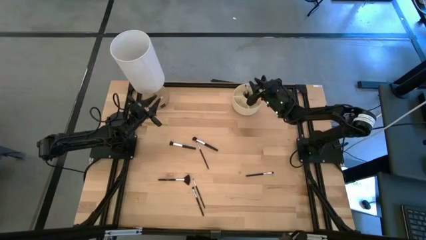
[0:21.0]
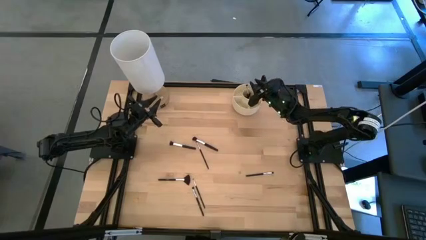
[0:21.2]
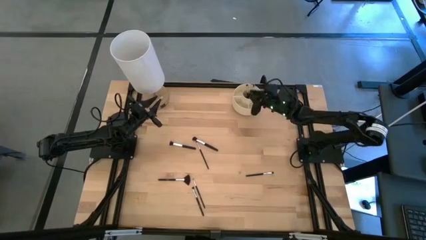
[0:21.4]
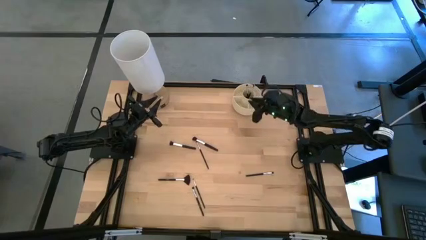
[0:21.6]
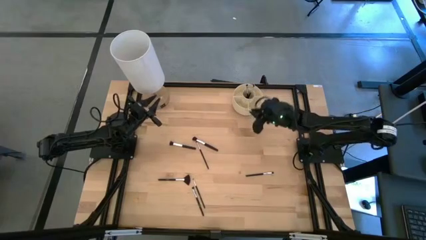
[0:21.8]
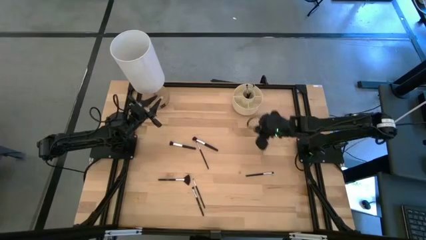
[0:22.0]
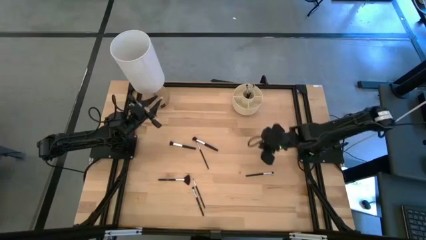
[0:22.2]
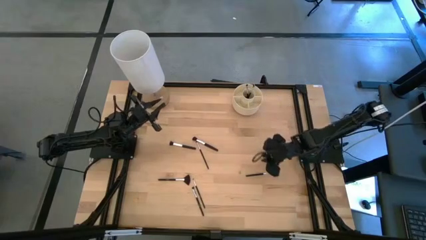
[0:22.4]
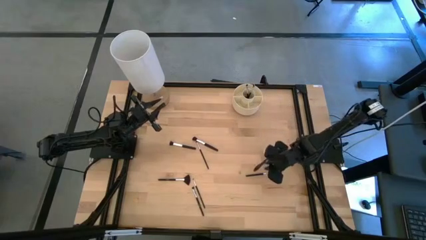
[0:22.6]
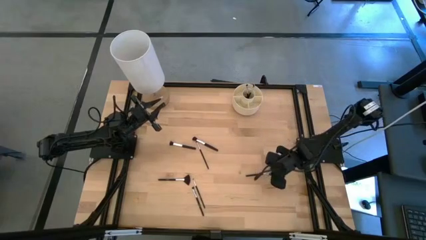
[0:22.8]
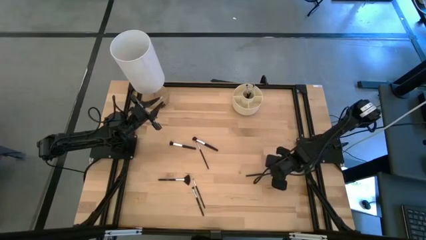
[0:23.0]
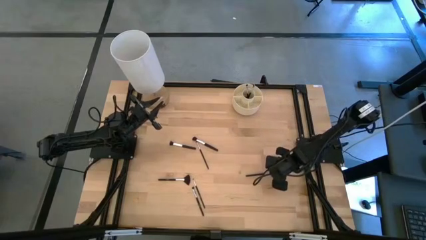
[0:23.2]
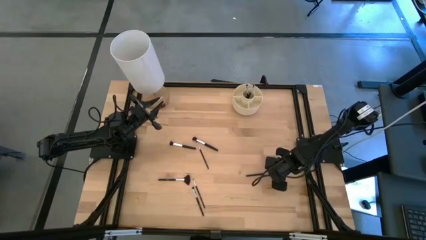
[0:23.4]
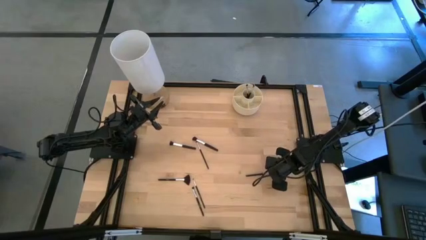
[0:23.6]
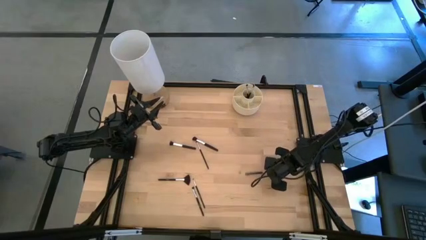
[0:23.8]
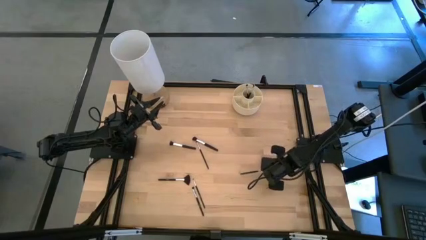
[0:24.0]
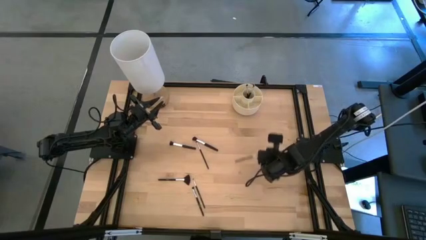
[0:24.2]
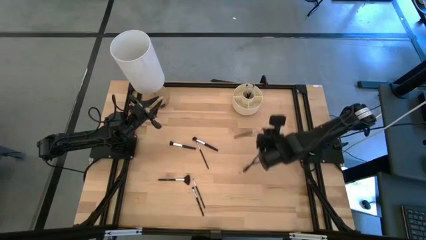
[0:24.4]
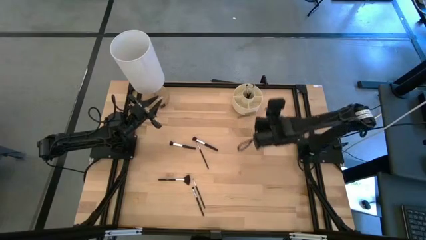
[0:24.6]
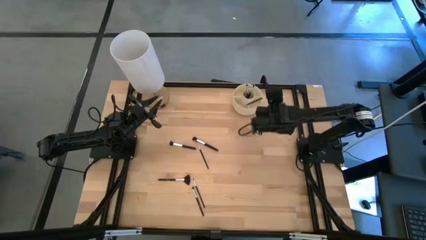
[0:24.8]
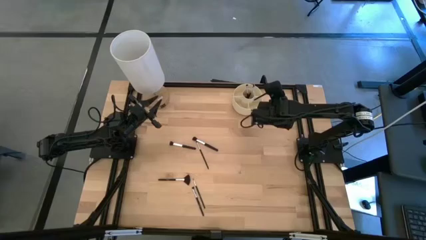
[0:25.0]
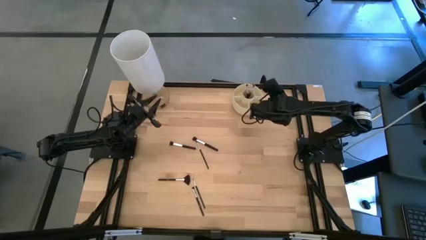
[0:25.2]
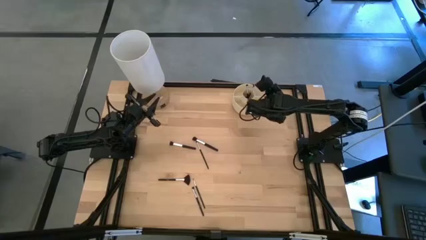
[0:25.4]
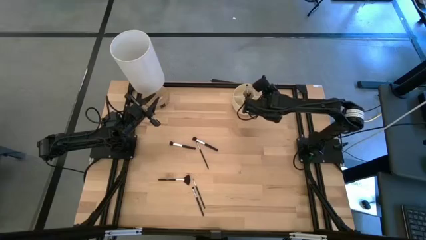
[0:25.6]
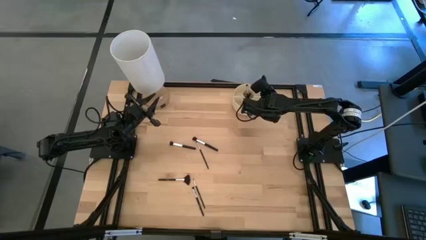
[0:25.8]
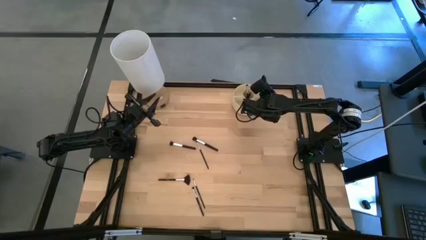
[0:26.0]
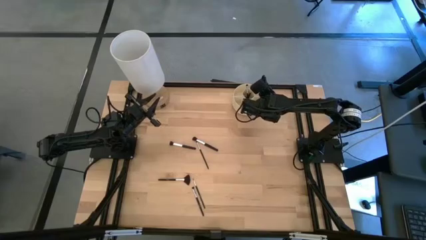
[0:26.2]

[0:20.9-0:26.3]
Task: Sort items
Put the foundation brush into the pen organizer

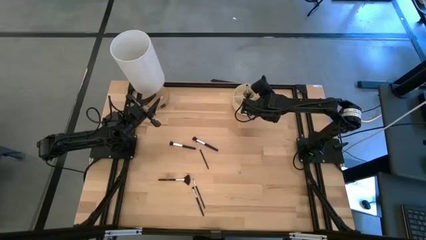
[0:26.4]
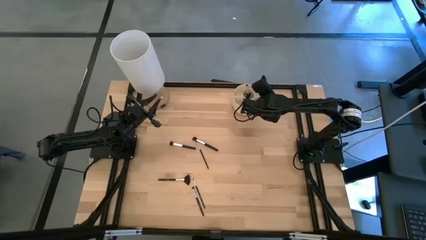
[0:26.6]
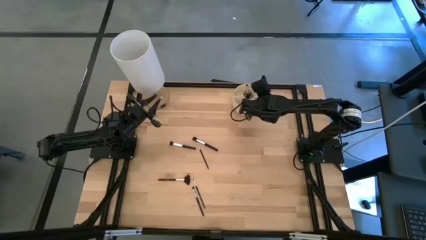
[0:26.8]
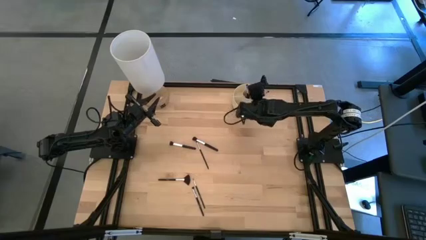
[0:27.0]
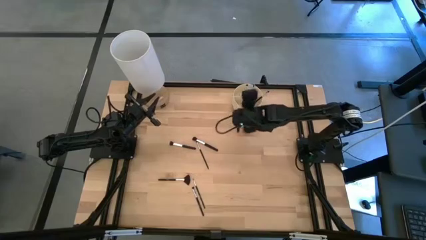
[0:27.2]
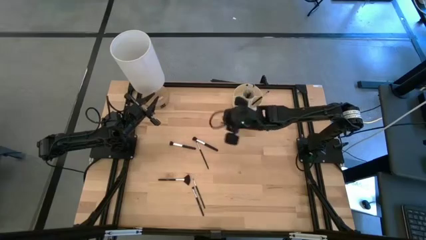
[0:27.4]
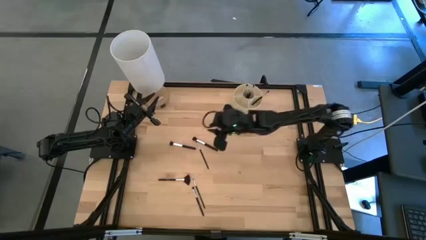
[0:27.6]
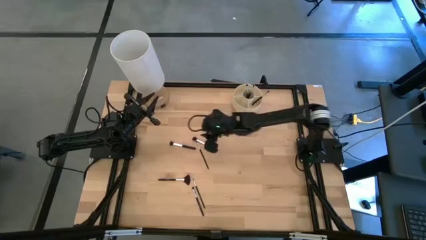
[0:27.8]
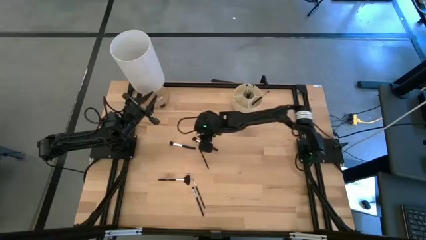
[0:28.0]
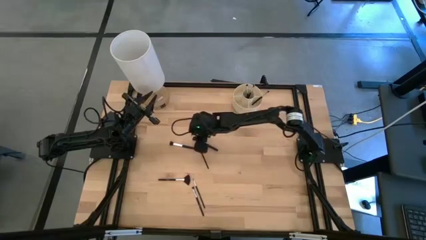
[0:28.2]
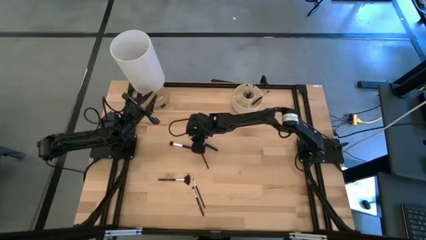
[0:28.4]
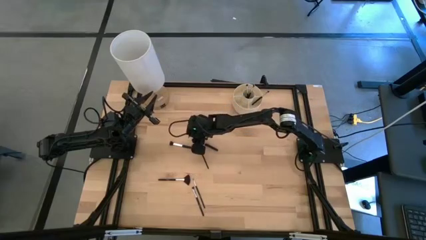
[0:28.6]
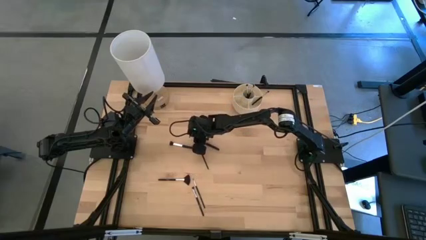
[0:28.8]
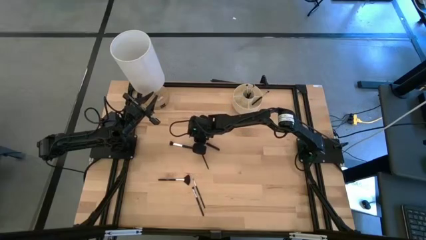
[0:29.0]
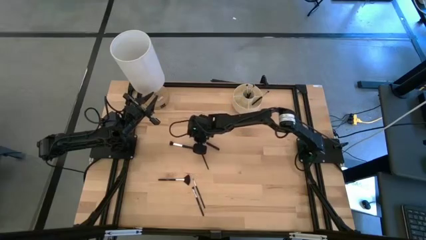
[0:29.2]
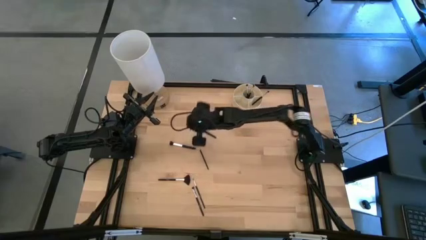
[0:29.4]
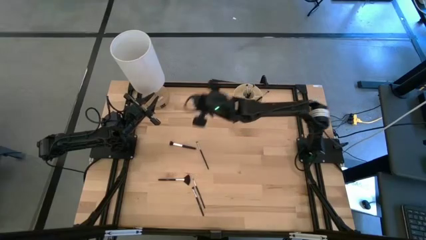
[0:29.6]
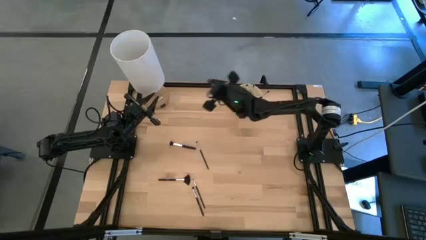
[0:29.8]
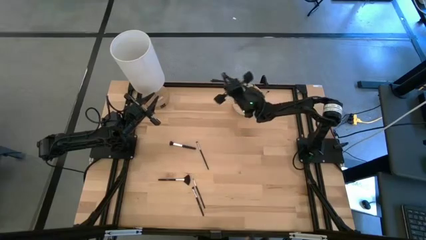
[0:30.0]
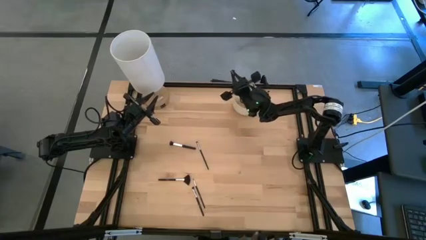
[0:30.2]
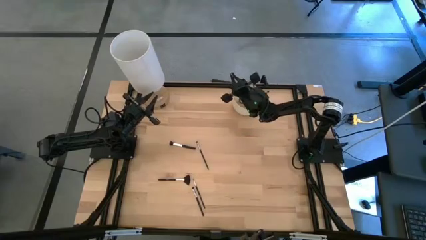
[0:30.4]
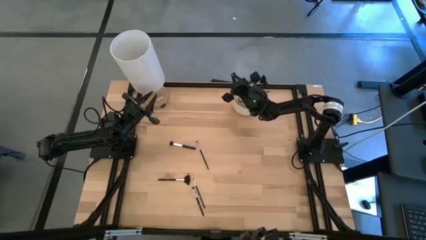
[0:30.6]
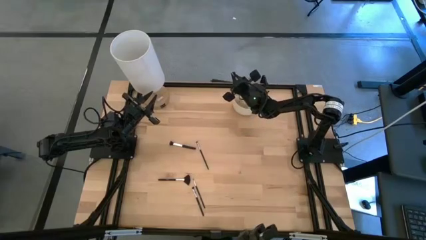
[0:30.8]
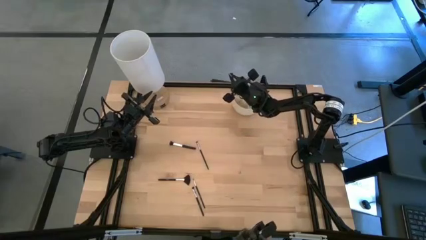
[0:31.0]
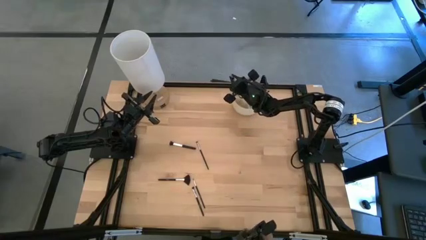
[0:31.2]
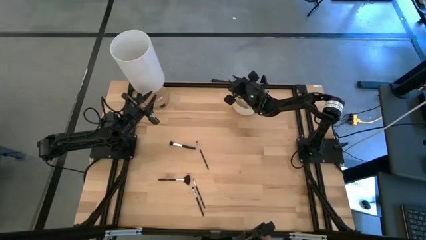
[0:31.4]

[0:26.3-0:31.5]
Put the powder brush into the pen organizer

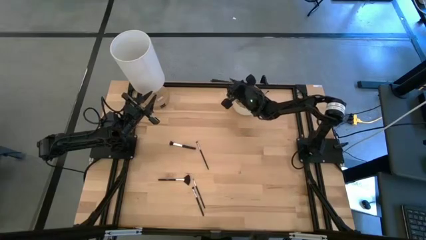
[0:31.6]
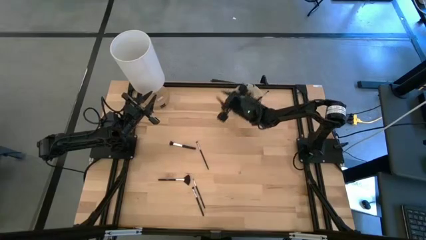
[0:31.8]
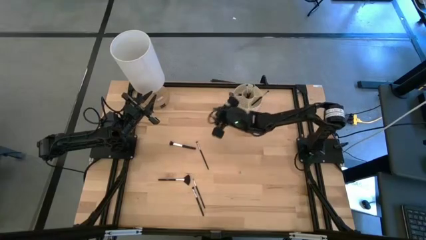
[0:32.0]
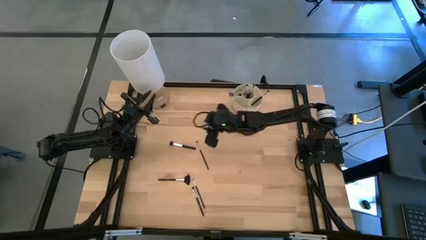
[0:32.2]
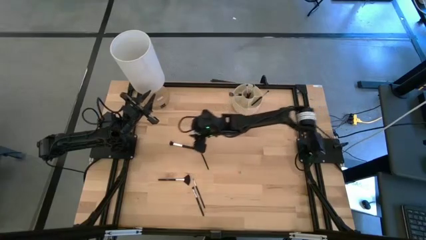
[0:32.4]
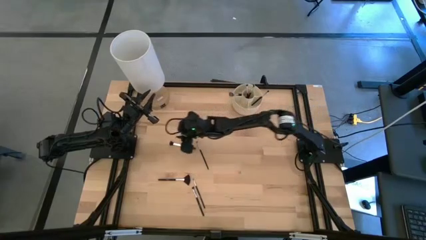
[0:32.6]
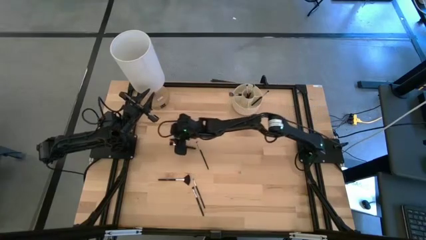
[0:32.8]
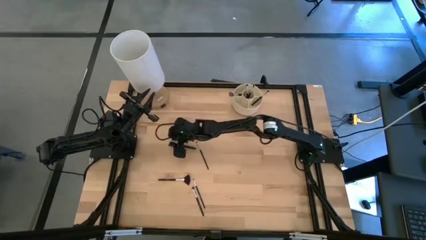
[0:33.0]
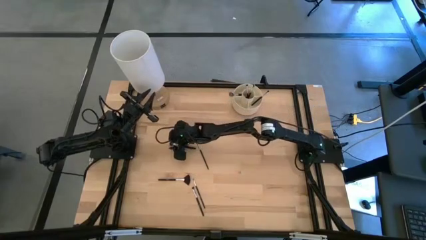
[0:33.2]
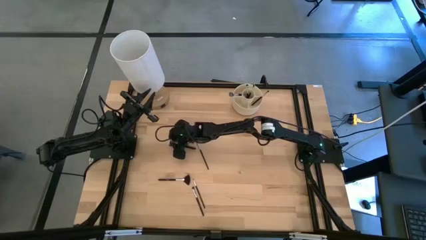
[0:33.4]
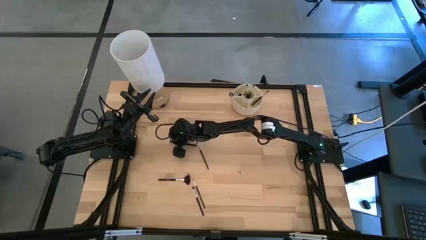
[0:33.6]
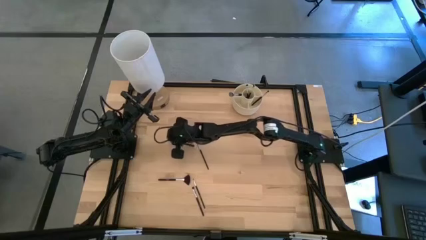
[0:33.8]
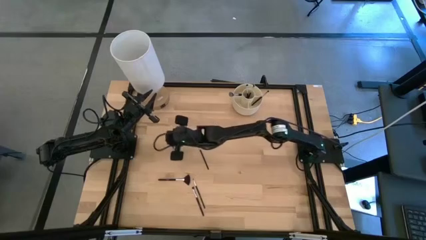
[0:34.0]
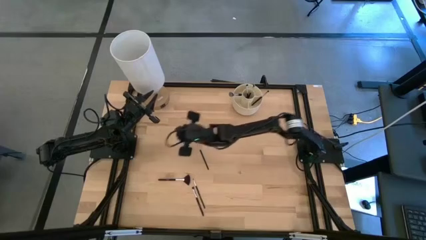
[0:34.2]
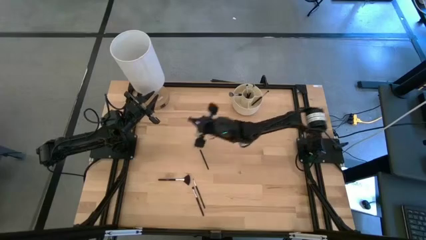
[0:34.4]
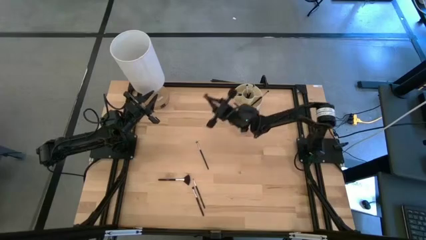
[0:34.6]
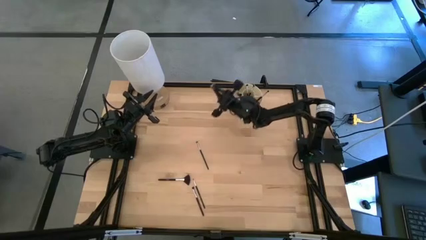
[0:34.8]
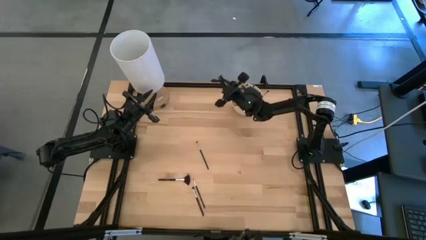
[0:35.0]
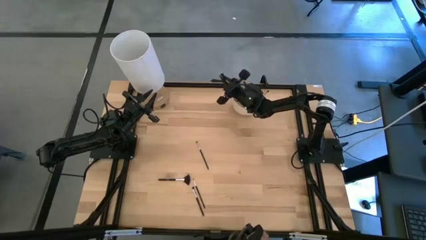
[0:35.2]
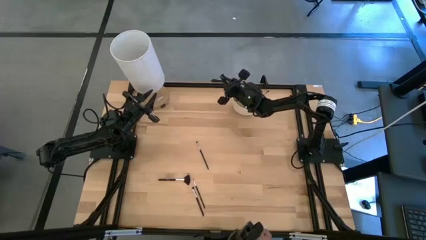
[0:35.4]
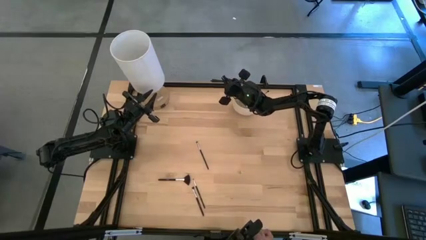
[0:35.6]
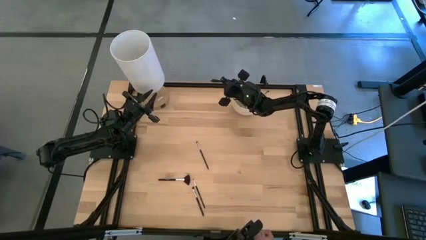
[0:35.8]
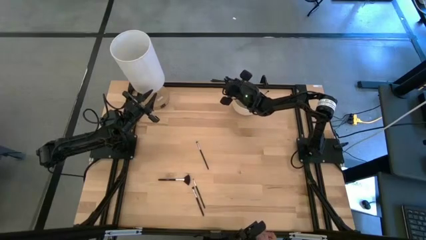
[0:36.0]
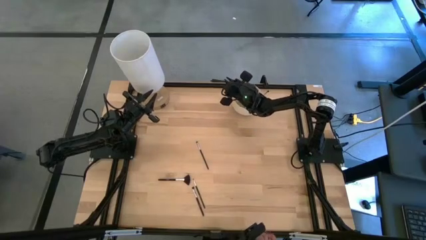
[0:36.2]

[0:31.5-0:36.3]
Put the powder brush into the pen organizer

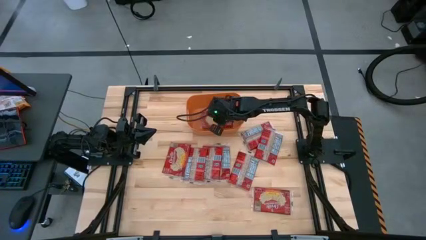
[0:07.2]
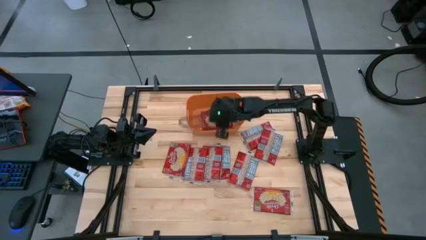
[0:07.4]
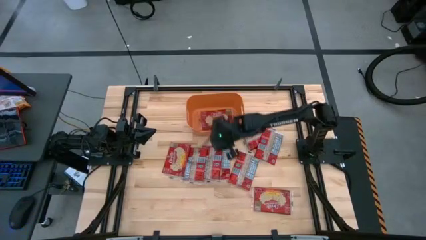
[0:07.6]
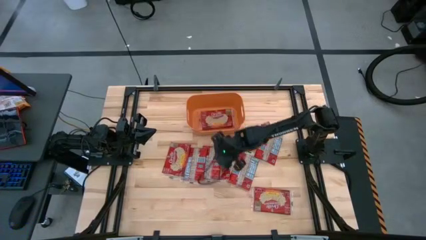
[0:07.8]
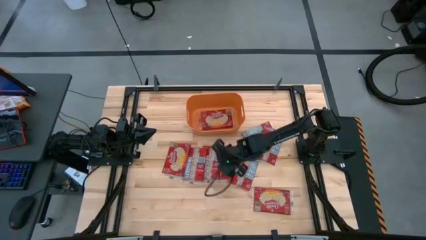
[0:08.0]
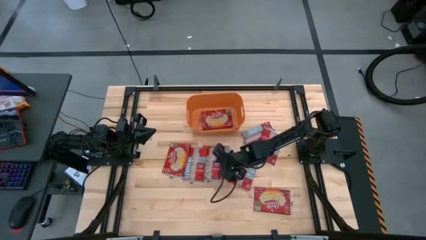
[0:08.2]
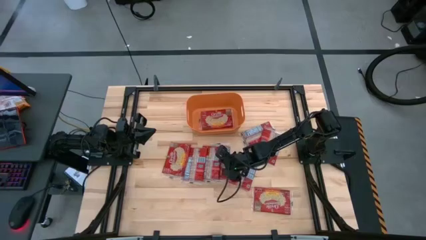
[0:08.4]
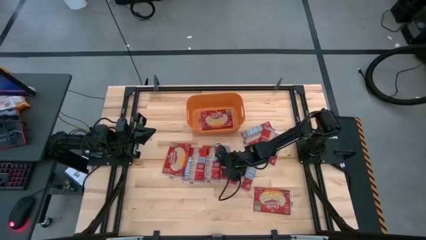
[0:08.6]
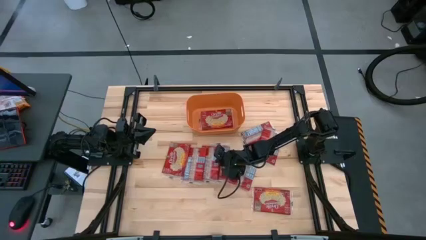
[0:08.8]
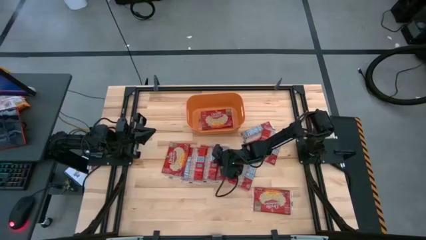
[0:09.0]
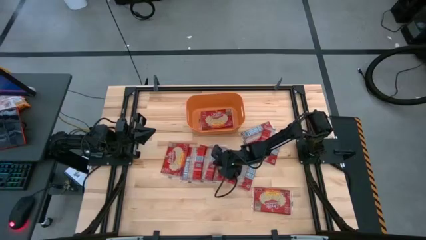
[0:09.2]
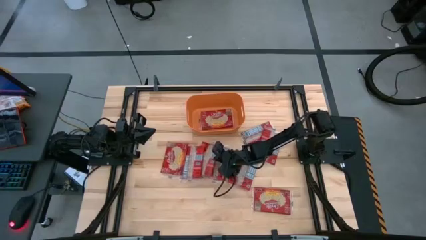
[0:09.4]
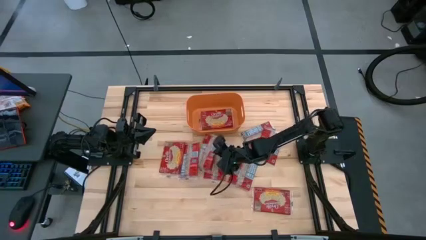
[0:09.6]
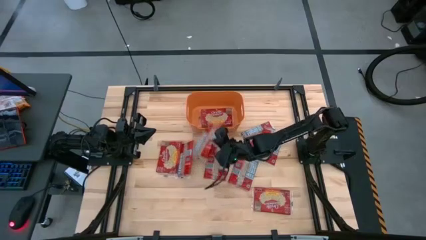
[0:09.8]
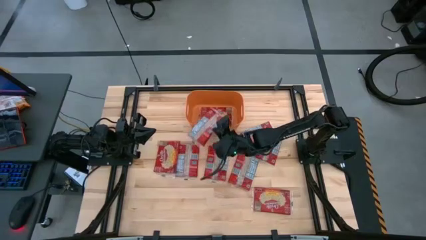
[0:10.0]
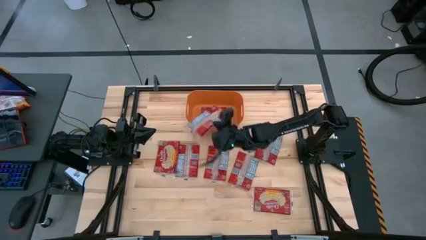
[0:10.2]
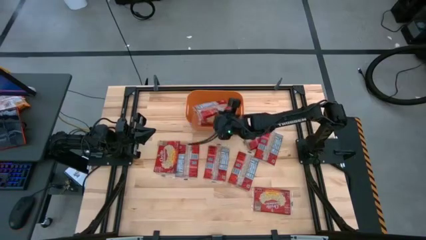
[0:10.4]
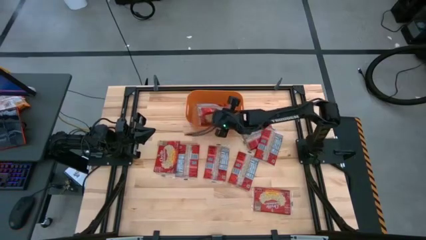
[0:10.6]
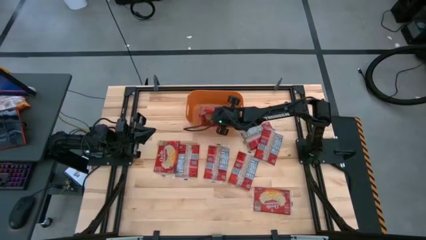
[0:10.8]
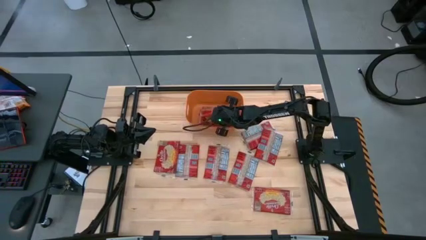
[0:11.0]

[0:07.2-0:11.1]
Task: Sort popcorn bags into baskets
Put the red popcorn bag into the orange bin
